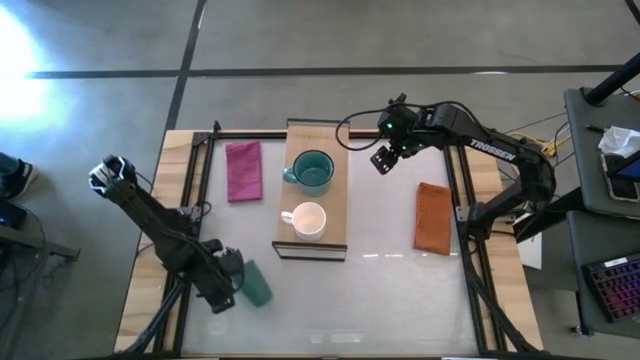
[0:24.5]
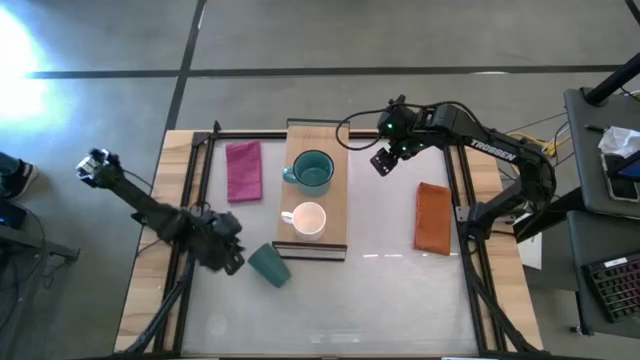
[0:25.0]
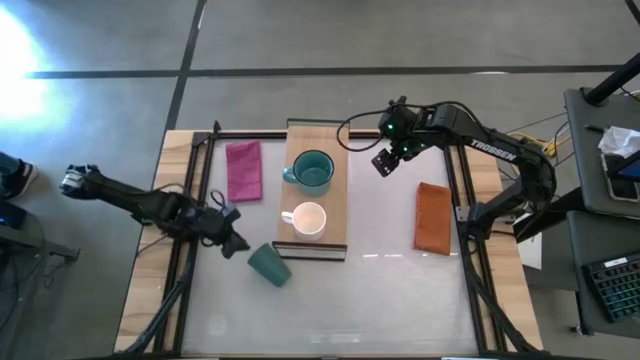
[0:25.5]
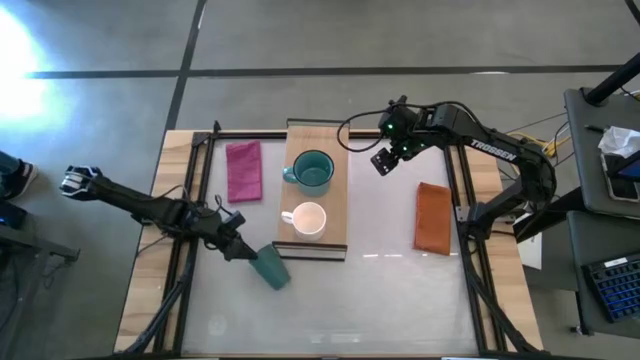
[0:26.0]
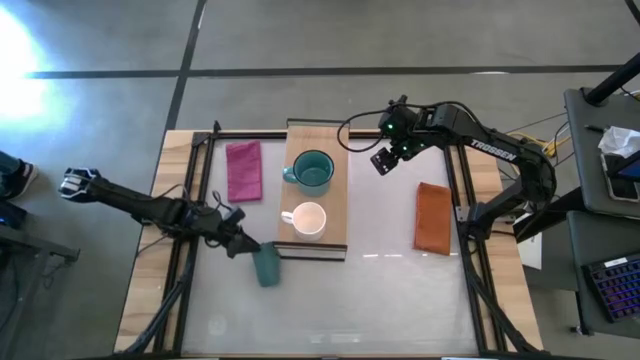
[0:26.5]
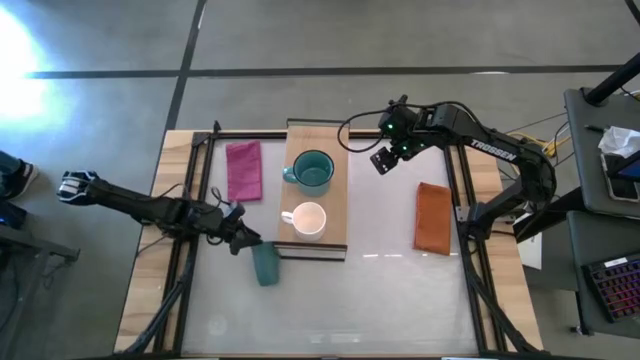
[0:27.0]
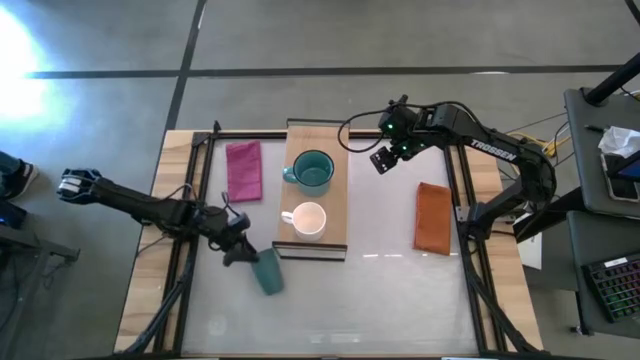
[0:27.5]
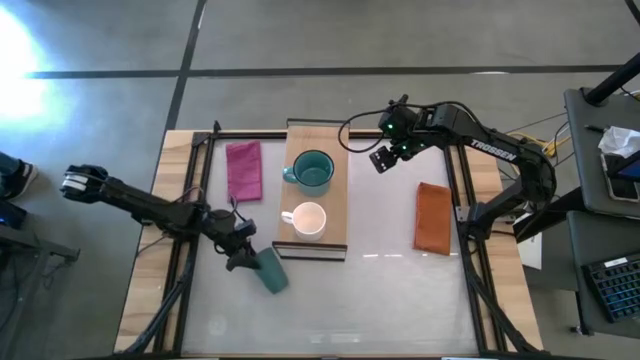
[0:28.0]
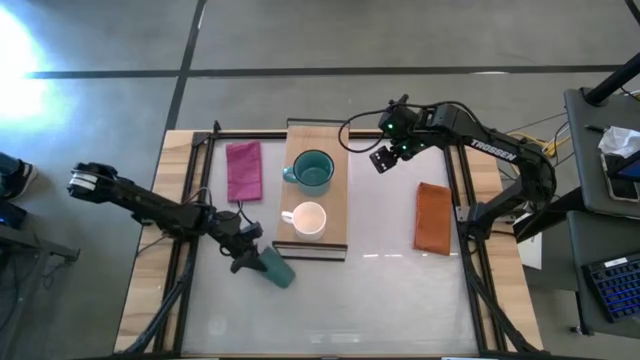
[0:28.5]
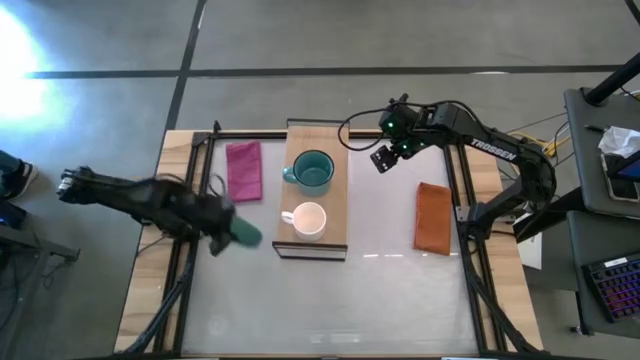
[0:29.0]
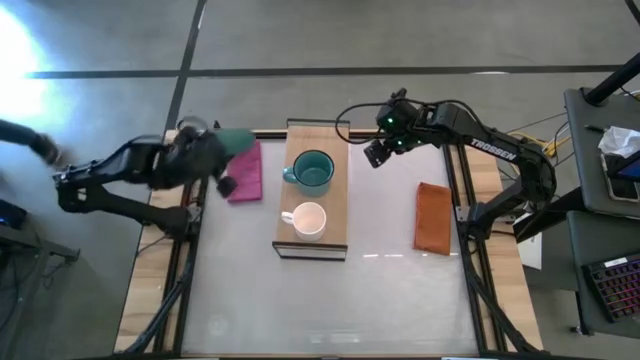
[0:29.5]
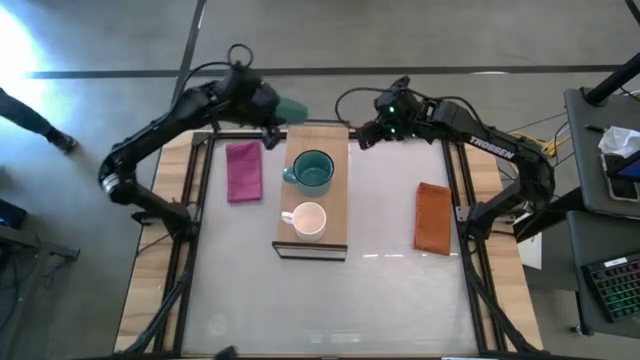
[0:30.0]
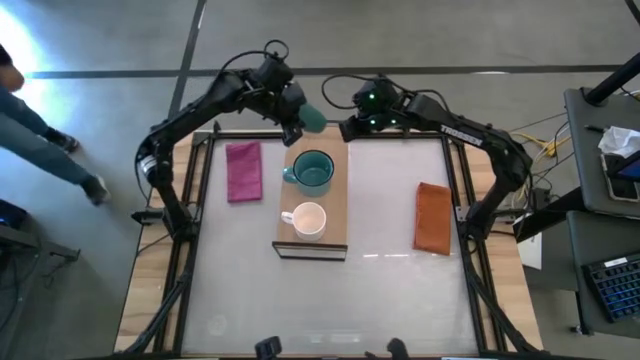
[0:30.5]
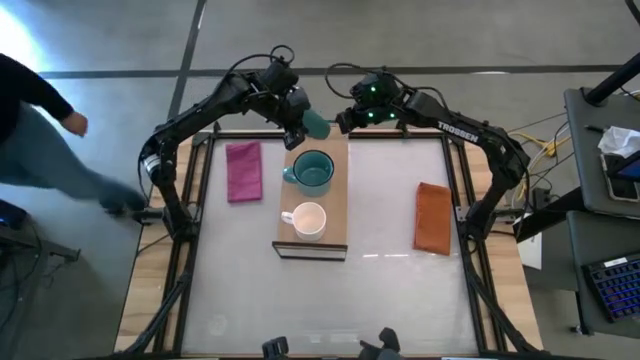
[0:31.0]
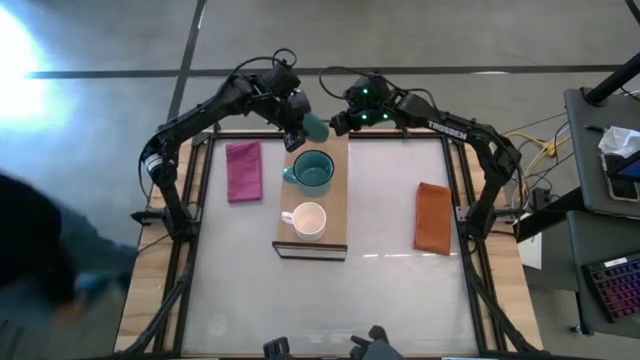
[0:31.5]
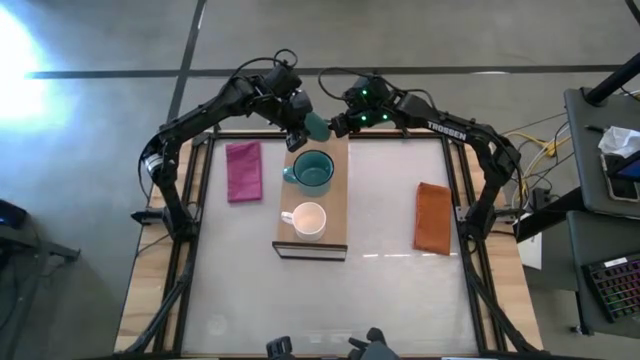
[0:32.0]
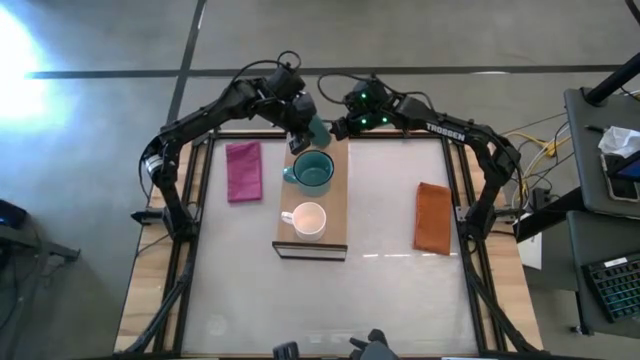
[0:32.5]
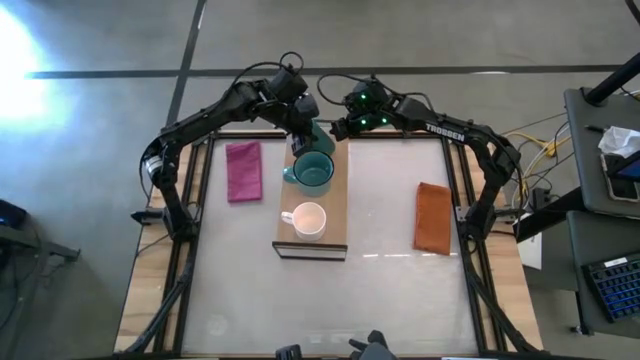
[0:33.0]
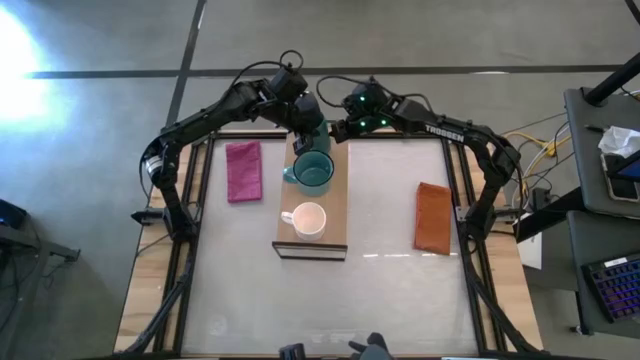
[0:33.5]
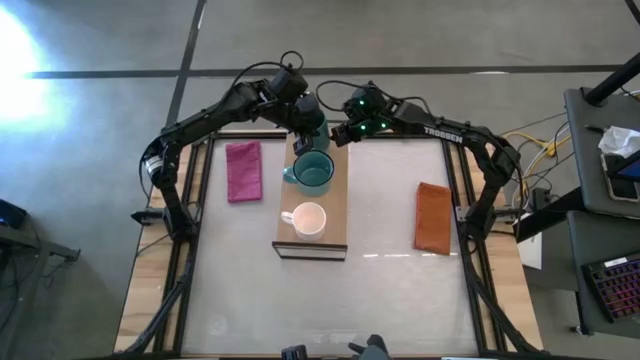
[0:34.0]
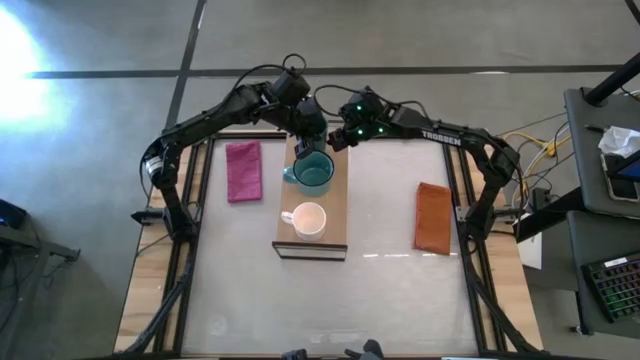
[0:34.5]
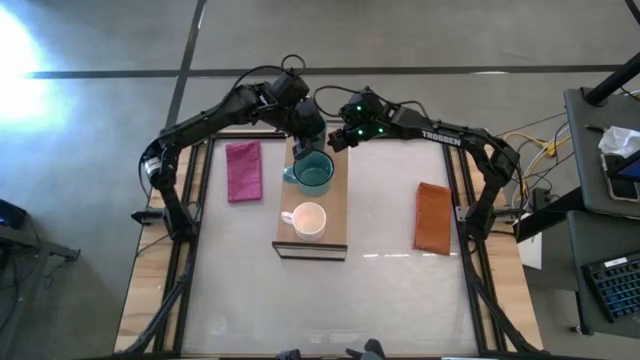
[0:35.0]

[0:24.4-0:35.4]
Task: Stack small to large cups/mugs on shelf
Put the green cup on the shelf

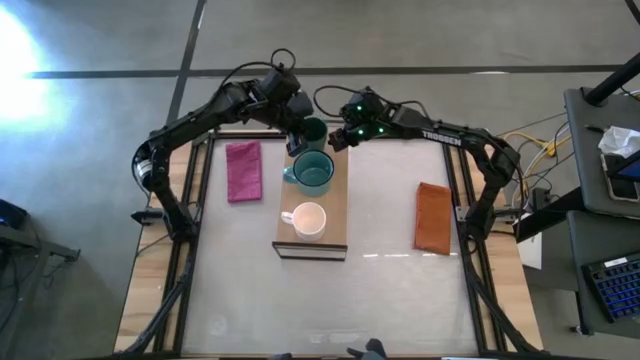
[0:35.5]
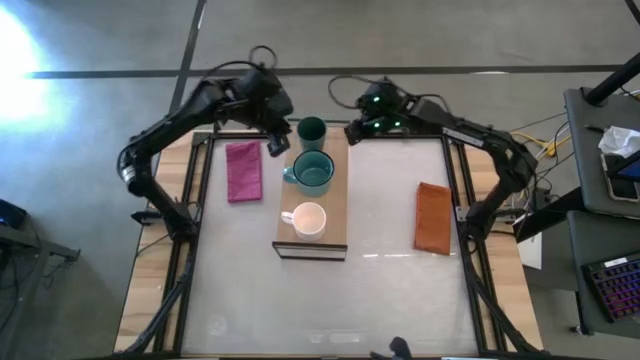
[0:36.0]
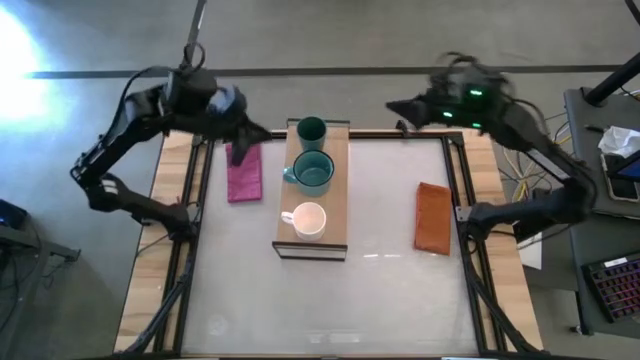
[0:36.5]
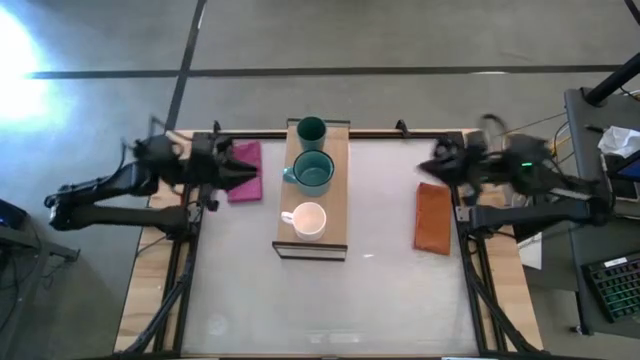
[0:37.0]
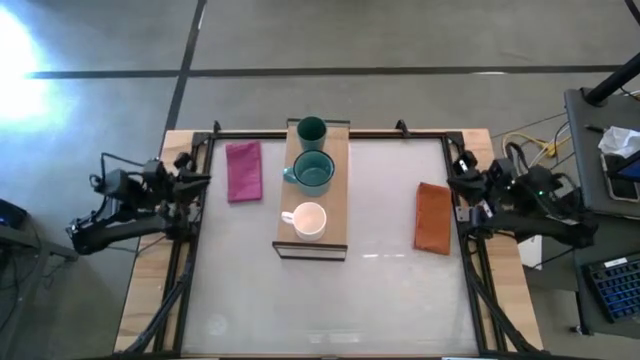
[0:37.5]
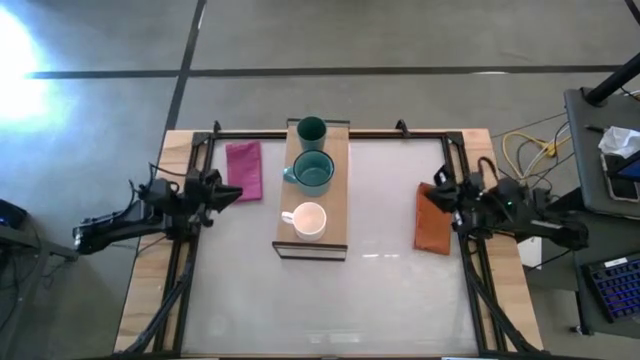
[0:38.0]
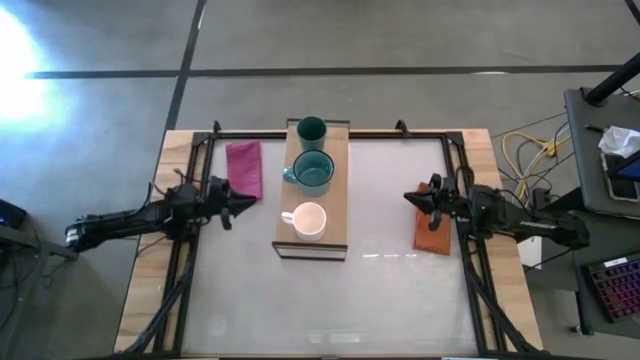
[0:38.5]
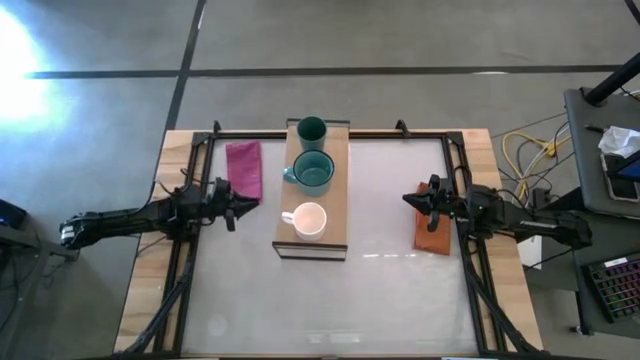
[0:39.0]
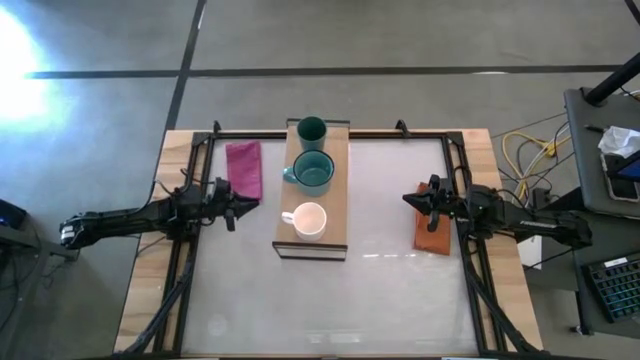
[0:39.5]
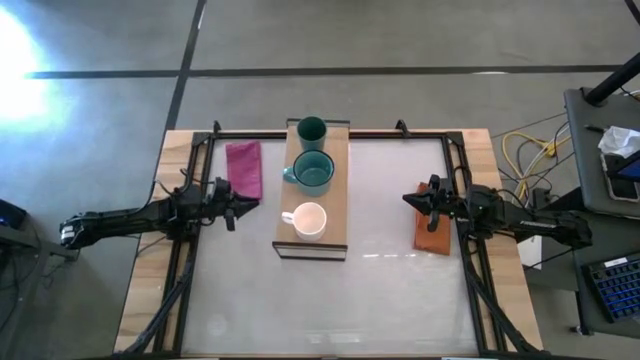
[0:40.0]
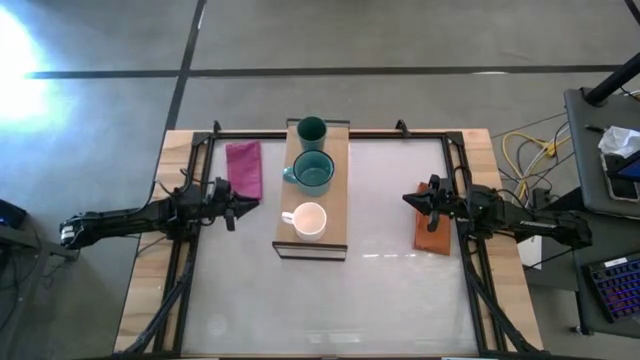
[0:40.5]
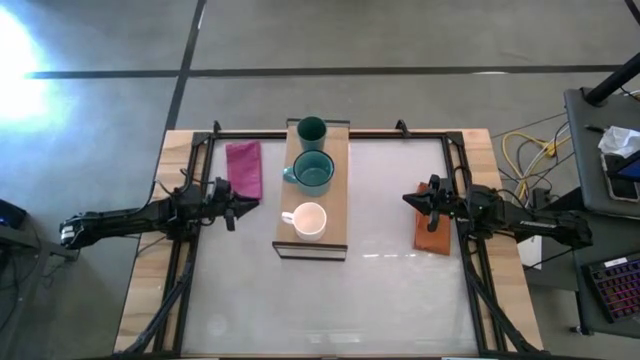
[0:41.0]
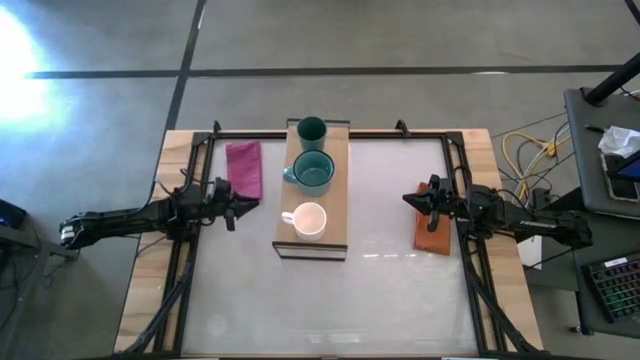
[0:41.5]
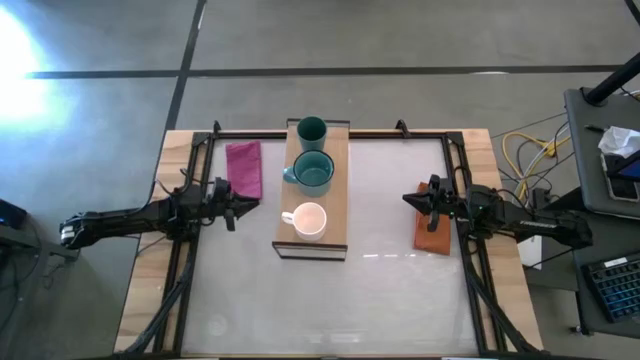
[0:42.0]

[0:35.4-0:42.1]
Return to Home Position

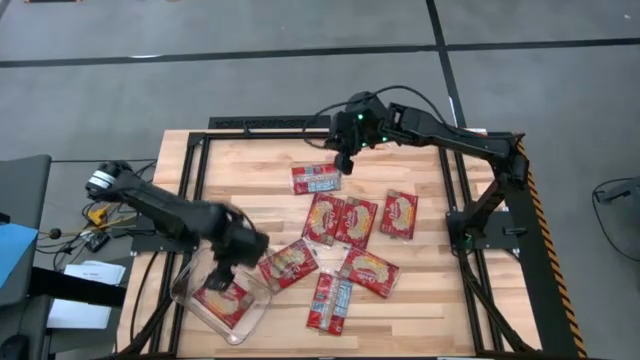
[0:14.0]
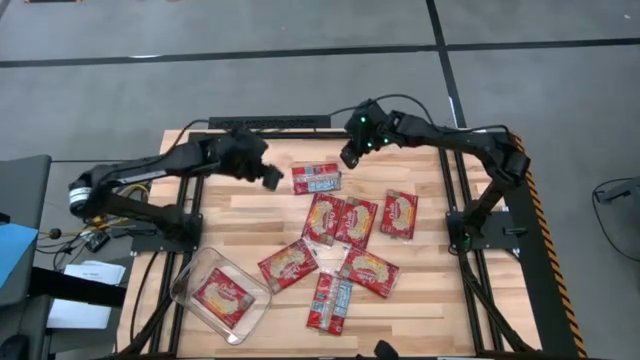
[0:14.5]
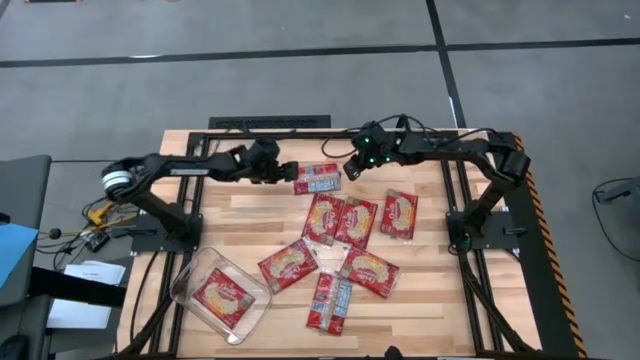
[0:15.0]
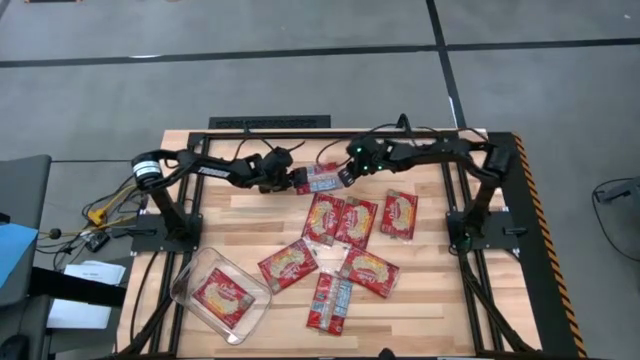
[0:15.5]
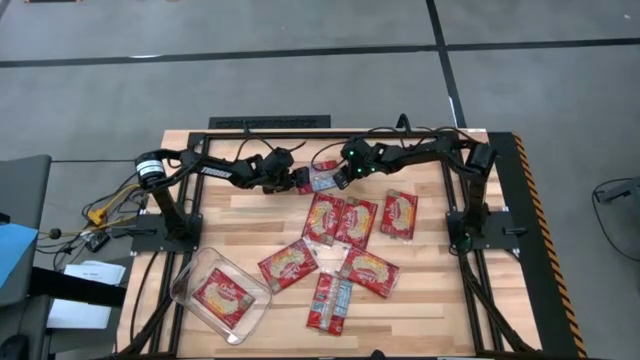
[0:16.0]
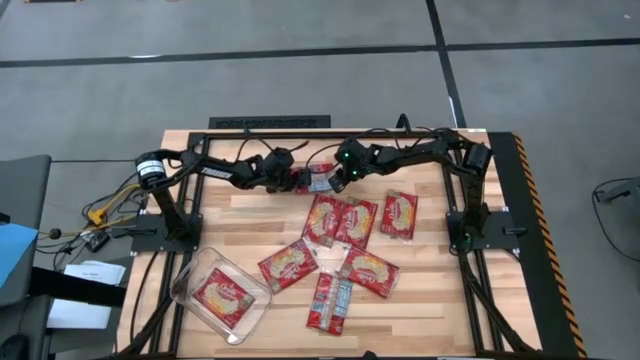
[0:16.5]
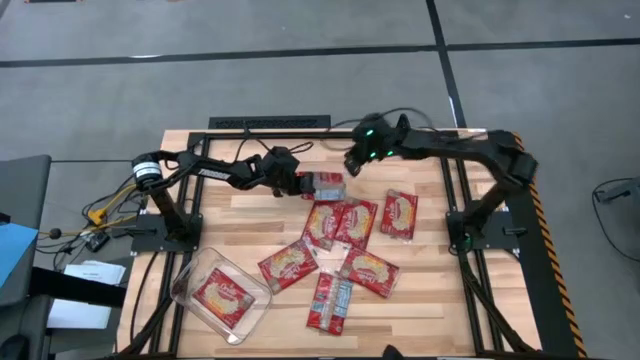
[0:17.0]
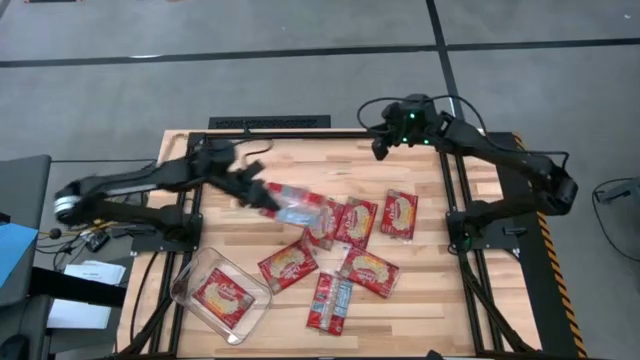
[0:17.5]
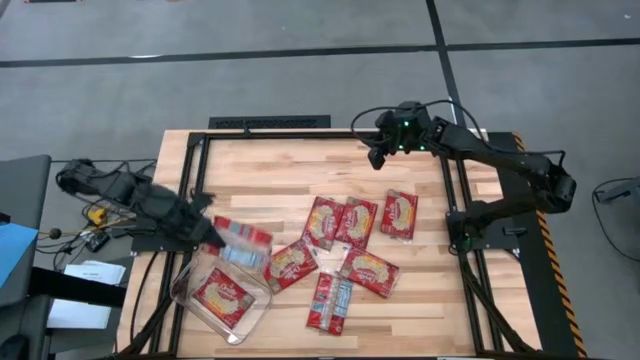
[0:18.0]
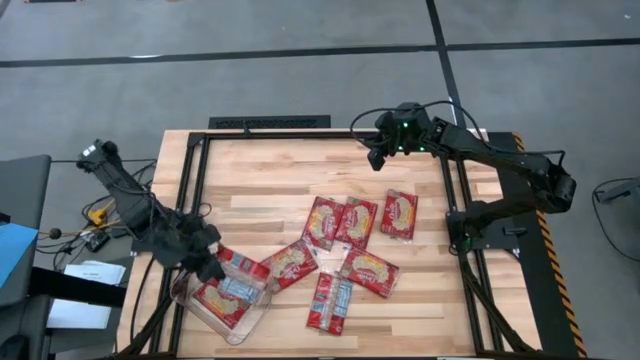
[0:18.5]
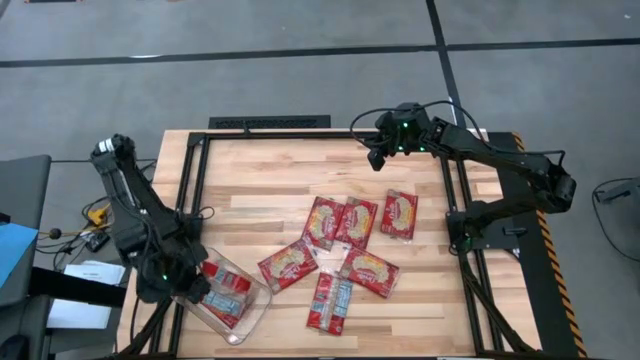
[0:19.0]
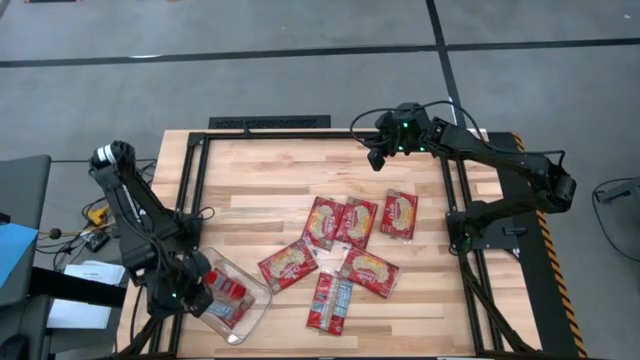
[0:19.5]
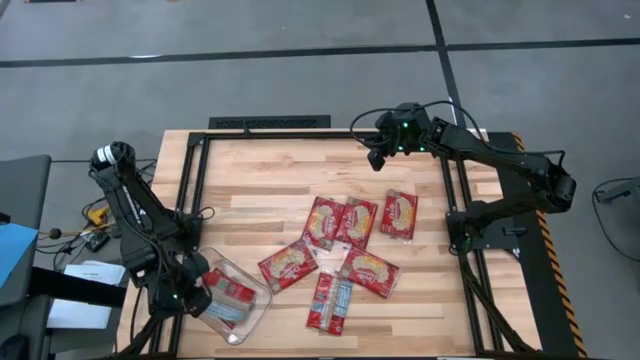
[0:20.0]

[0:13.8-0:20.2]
Task: Sort popcorn bags into baskets
Put the red popcorn bag into the transparent bin
